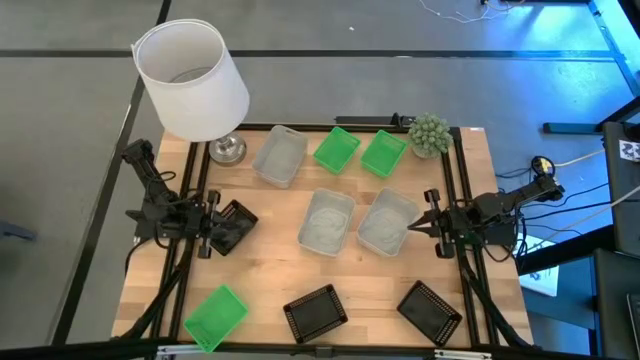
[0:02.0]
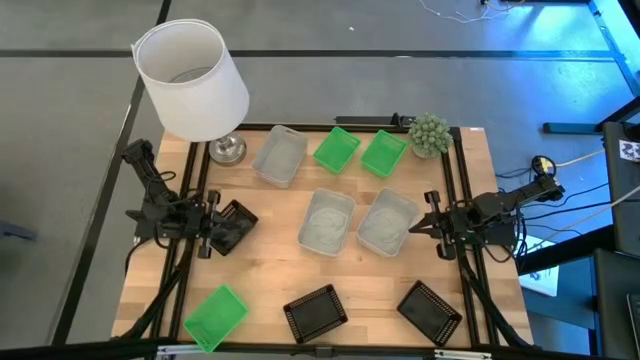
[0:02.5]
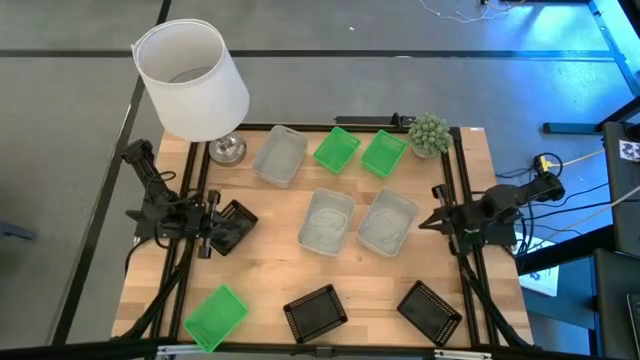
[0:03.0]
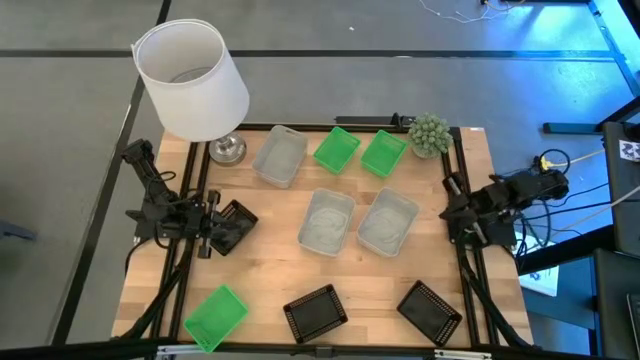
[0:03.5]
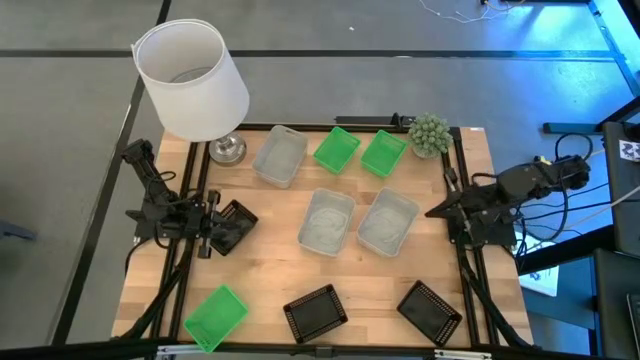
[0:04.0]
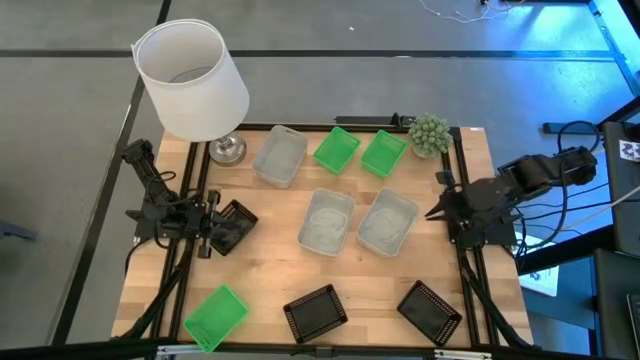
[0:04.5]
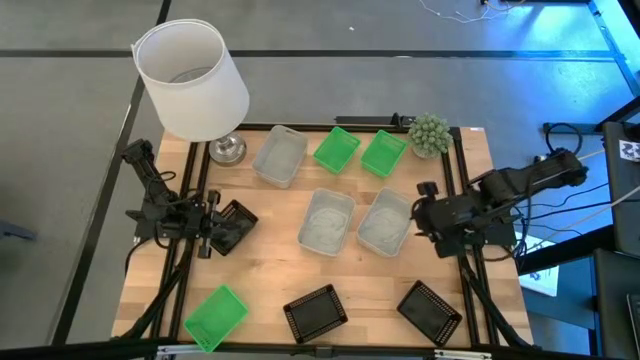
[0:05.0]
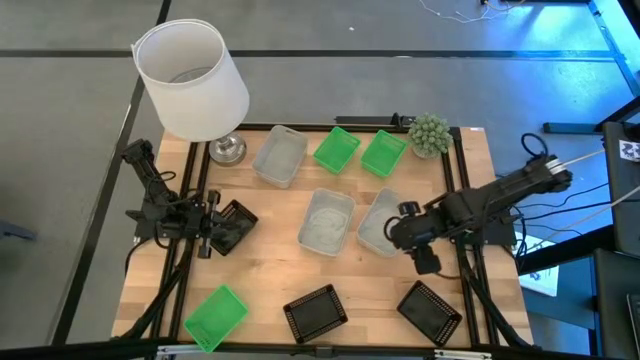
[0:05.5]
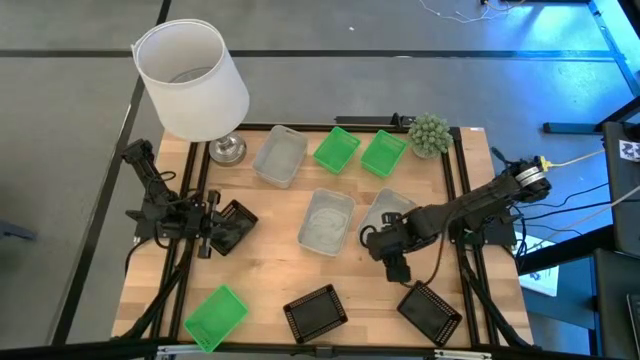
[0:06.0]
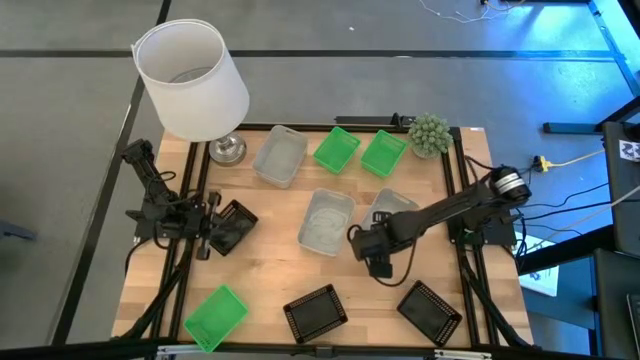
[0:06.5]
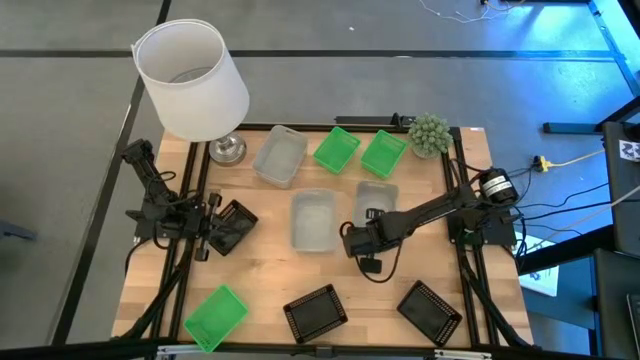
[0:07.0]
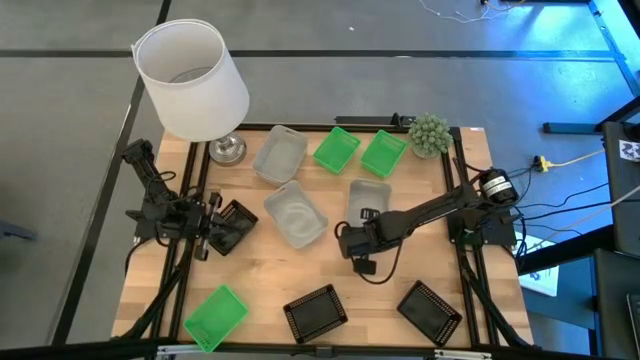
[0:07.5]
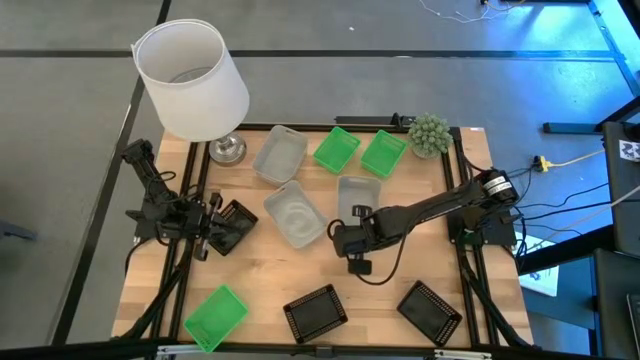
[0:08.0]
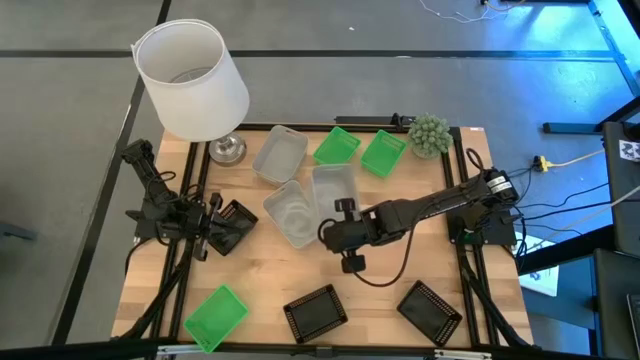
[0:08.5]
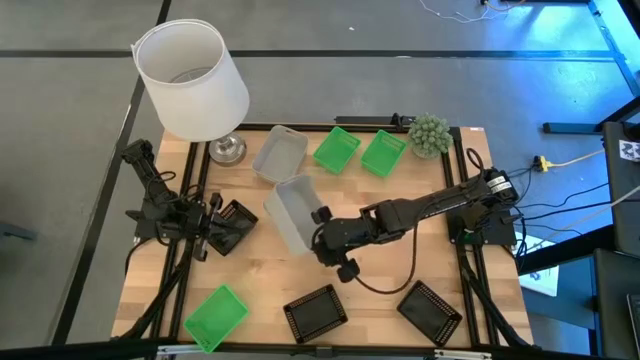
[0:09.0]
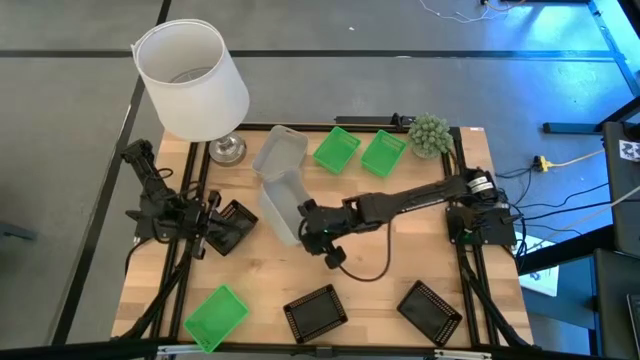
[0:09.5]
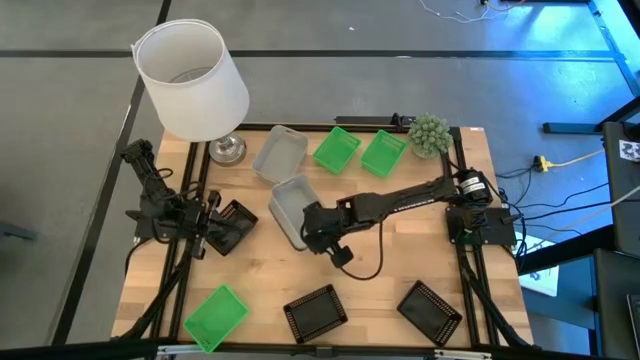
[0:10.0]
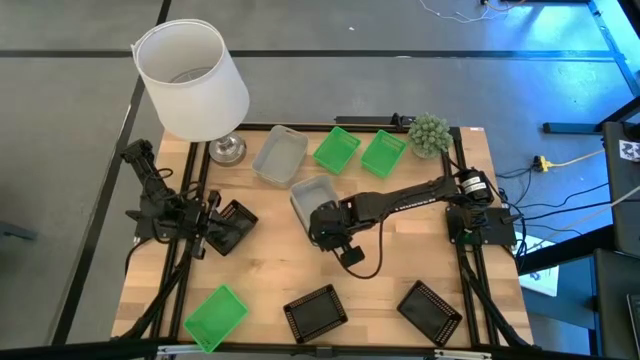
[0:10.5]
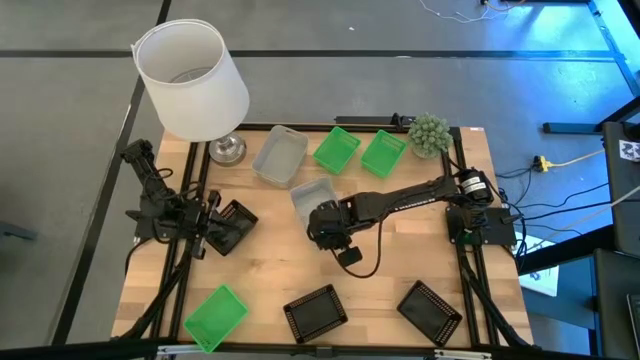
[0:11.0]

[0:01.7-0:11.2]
Stack the bottom right gray bin into the bottom left gray bin

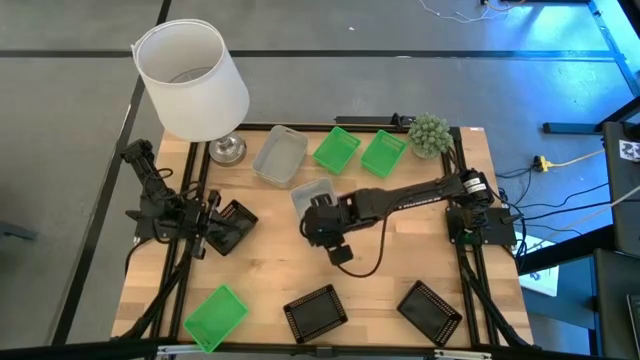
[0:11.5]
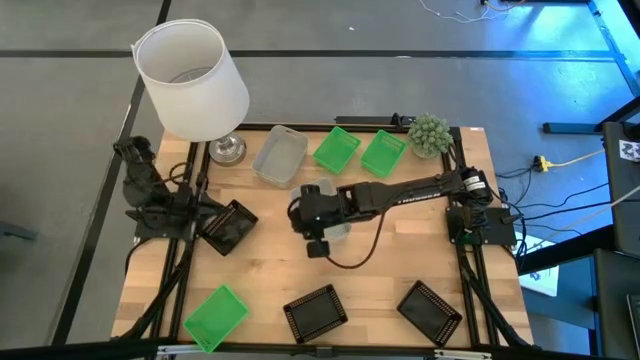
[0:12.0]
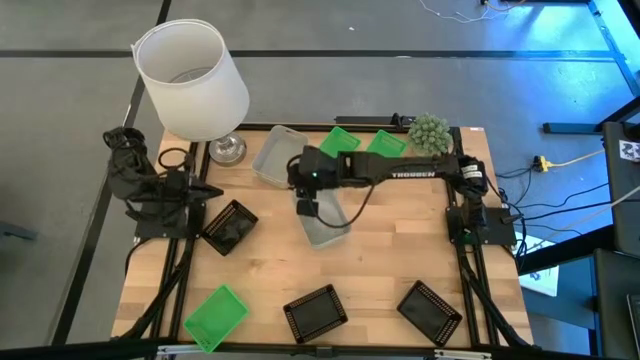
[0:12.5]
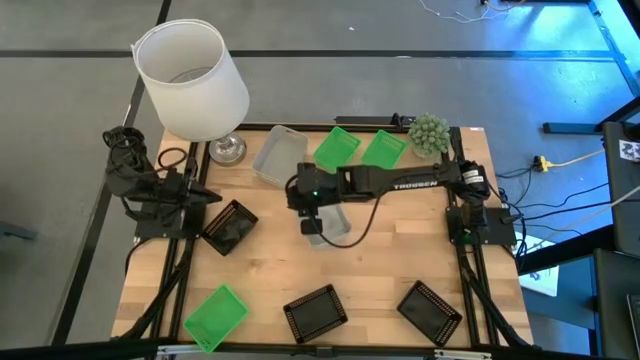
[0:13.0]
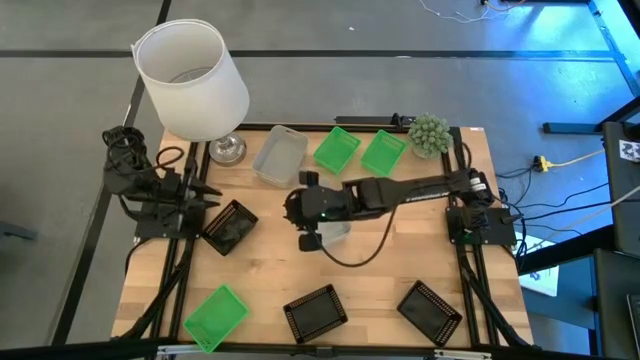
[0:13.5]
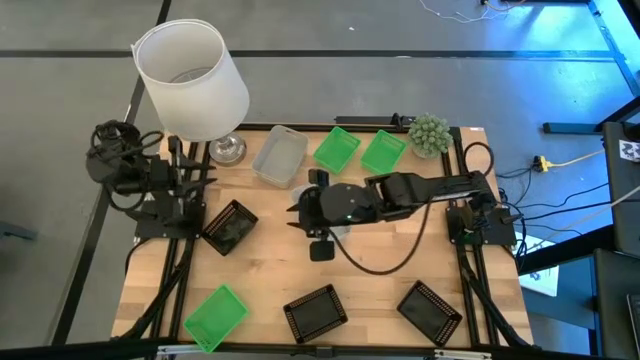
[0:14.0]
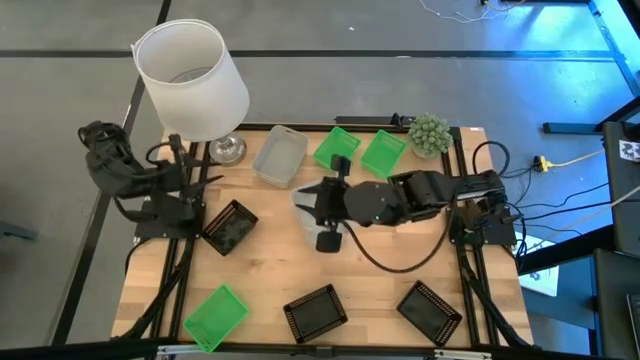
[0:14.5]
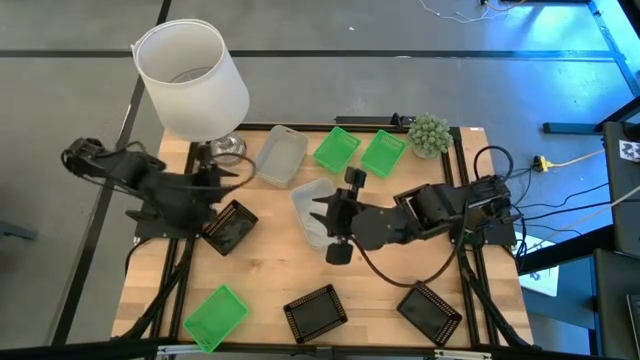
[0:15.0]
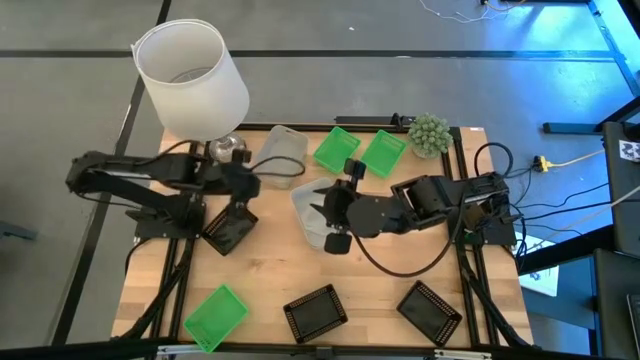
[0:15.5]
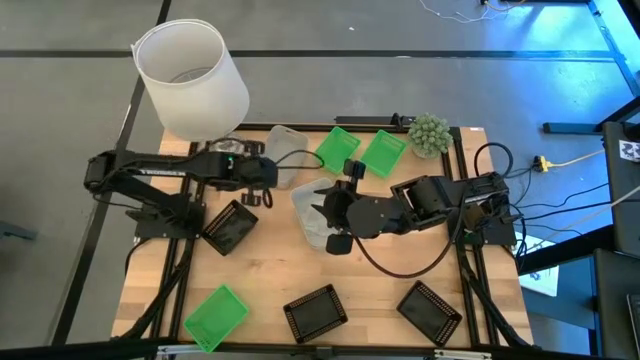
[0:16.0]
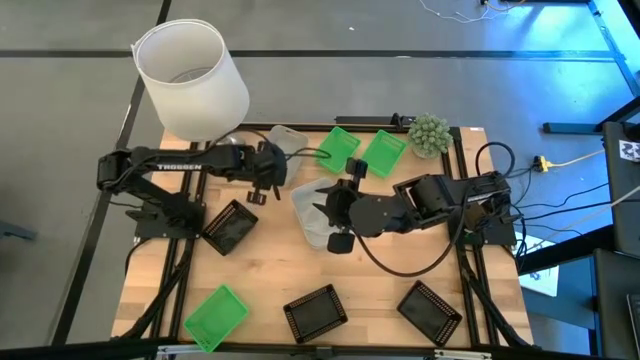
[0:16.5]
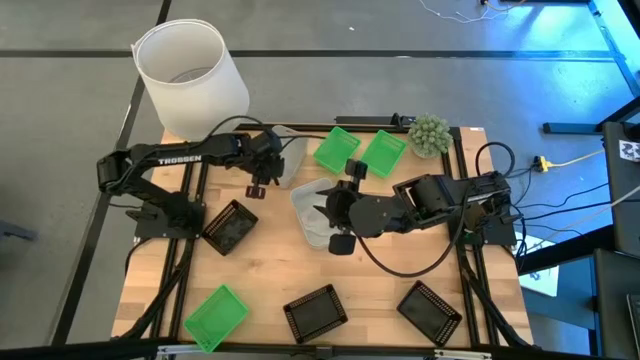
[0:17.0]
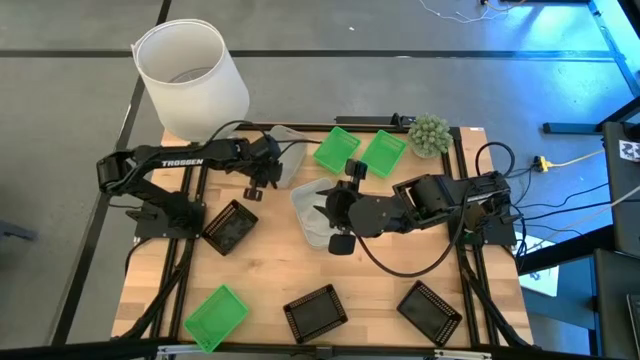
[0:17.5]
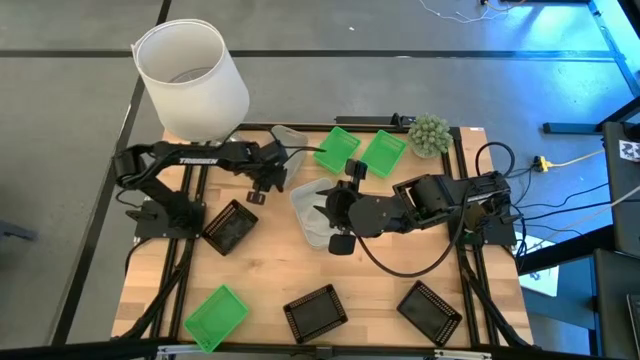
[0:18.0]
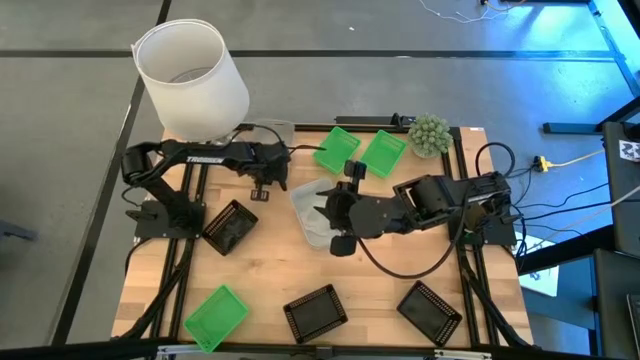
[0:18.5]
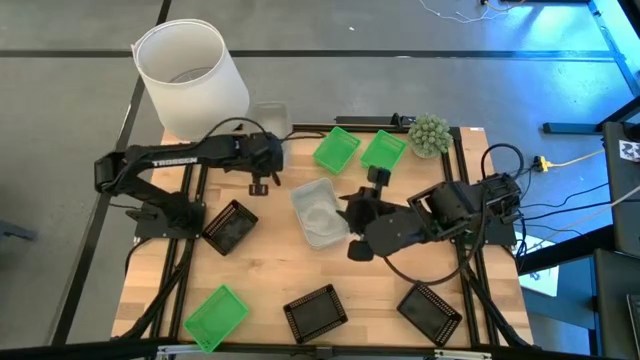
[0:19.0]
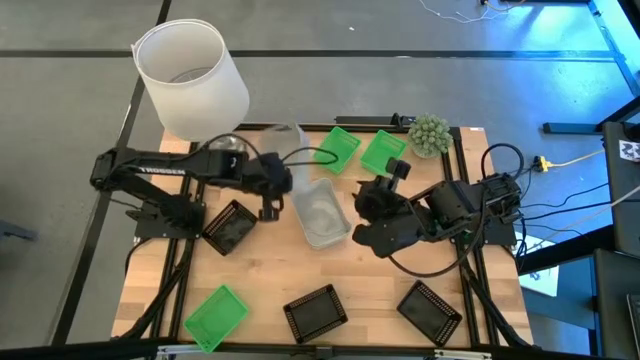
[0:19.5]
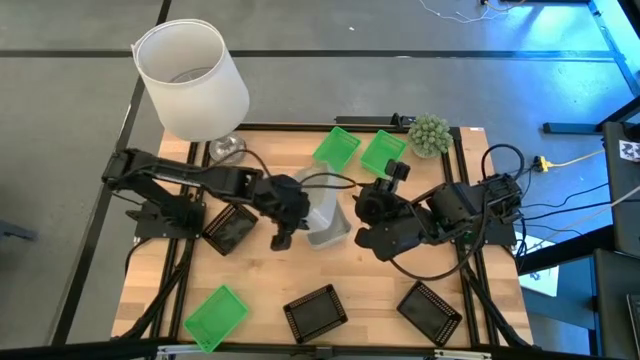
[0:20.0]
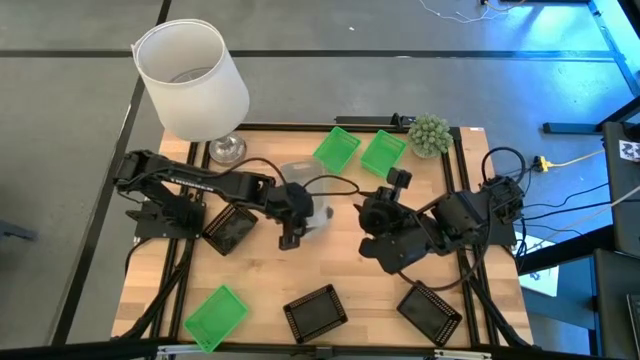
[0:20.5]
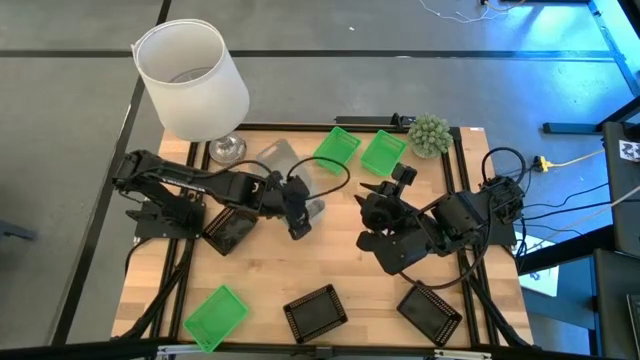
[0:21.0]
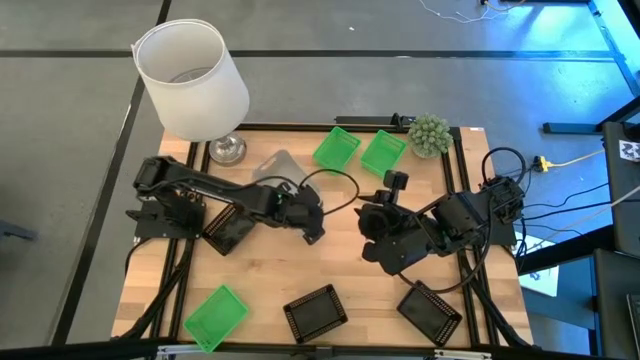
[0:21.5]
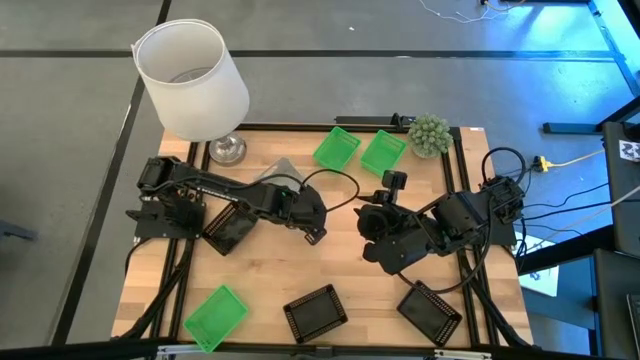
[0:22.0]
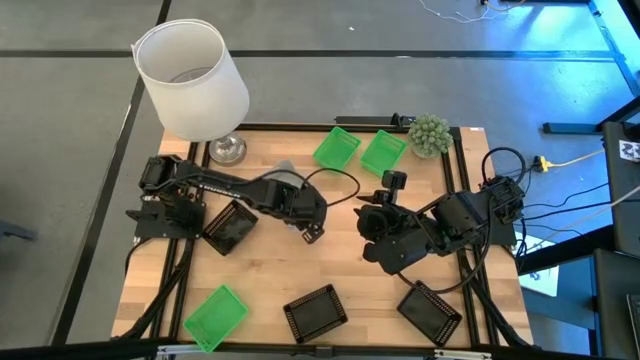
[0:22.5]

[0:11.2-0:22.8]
Stack the top gray bin into the bottom gray bin
